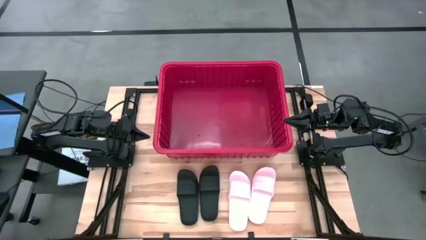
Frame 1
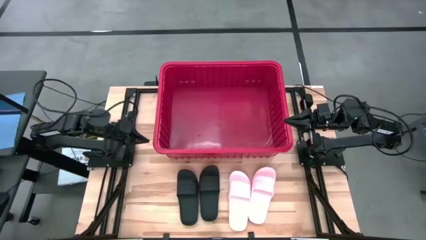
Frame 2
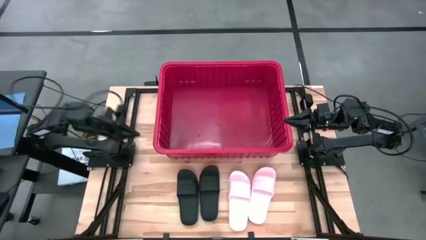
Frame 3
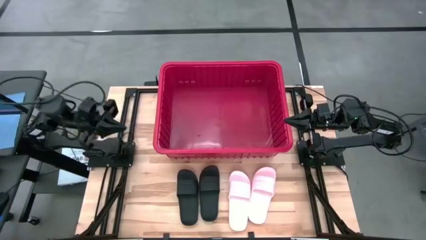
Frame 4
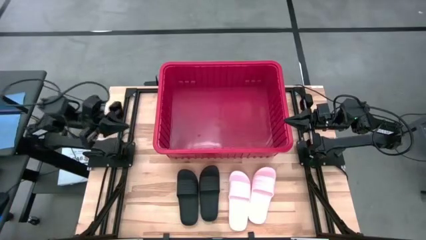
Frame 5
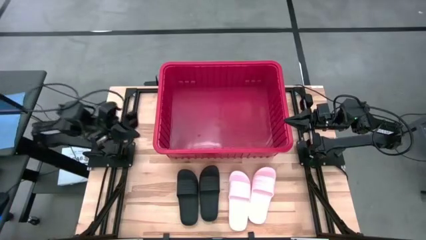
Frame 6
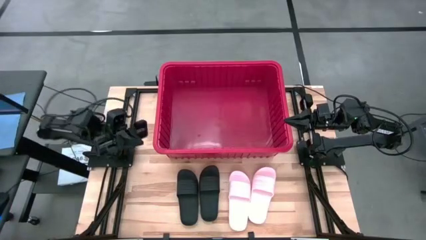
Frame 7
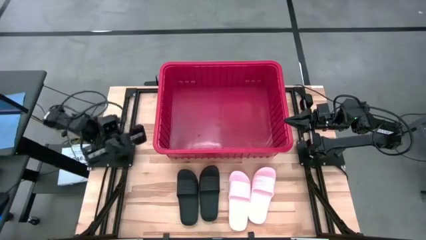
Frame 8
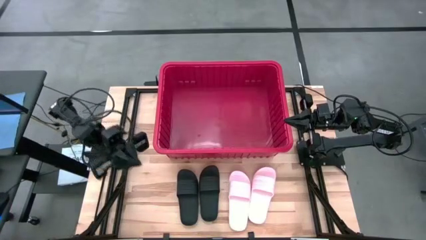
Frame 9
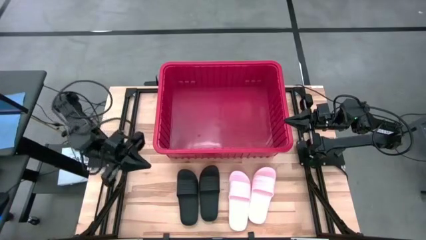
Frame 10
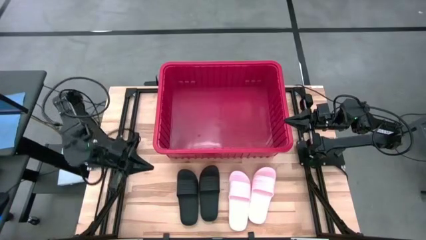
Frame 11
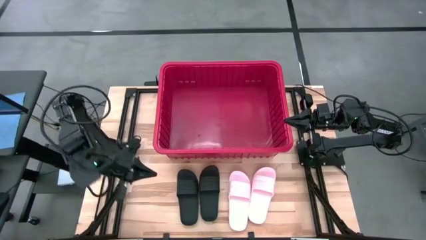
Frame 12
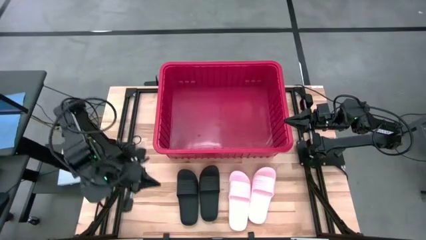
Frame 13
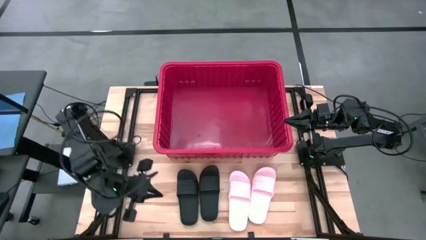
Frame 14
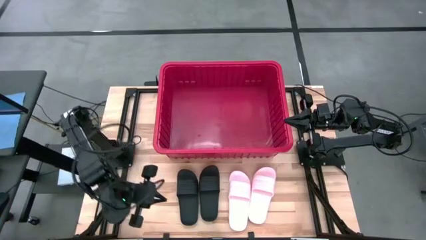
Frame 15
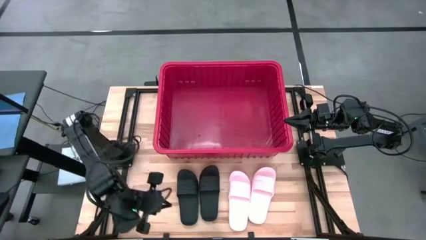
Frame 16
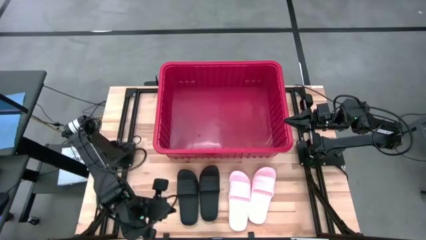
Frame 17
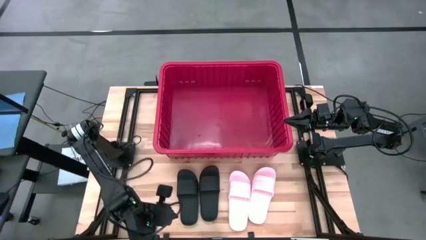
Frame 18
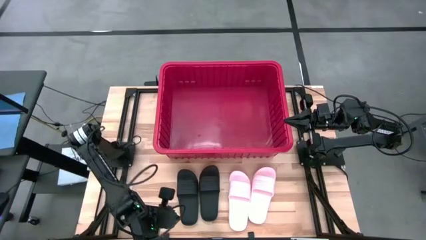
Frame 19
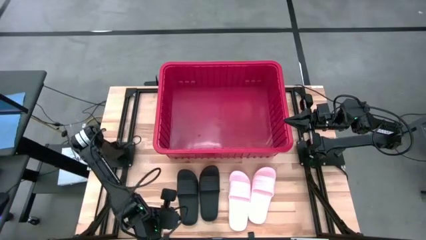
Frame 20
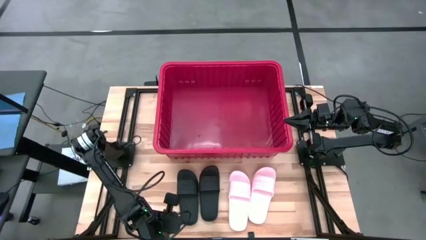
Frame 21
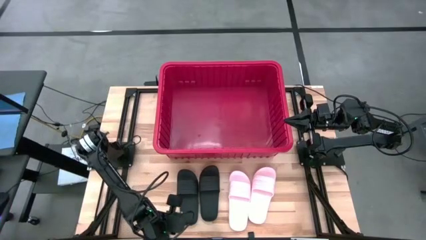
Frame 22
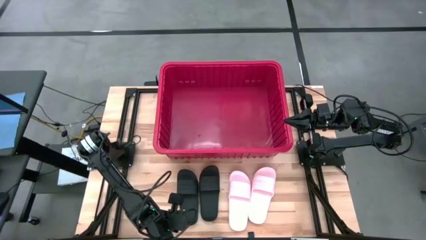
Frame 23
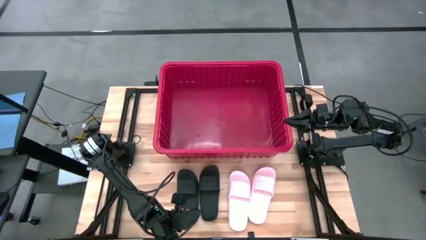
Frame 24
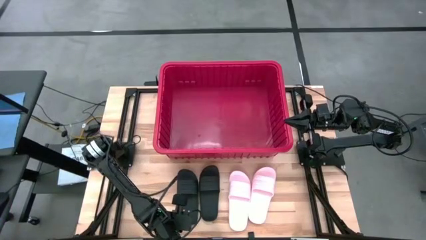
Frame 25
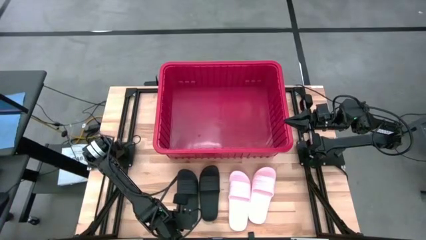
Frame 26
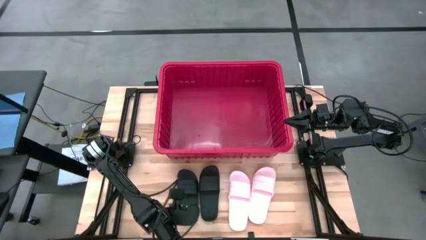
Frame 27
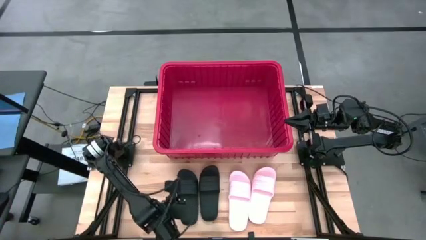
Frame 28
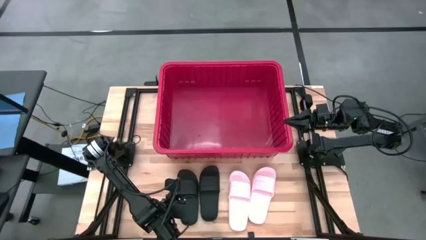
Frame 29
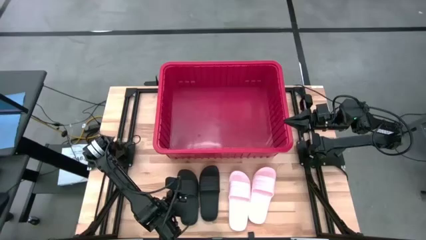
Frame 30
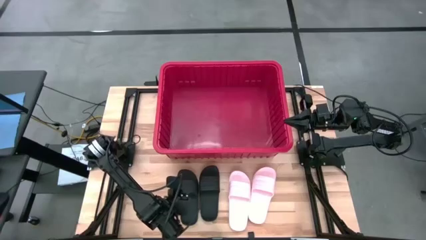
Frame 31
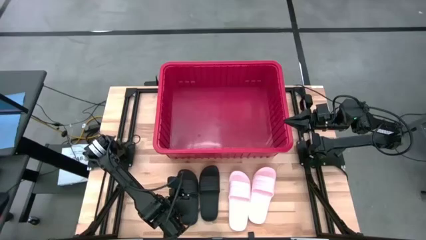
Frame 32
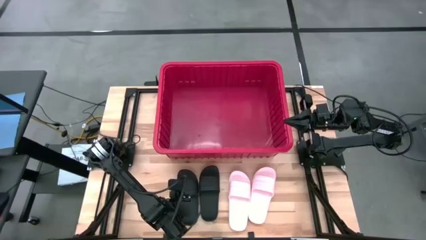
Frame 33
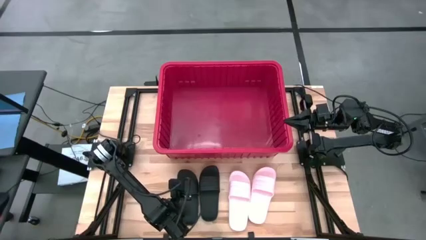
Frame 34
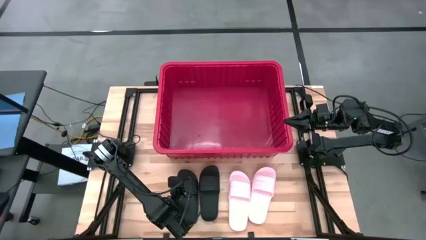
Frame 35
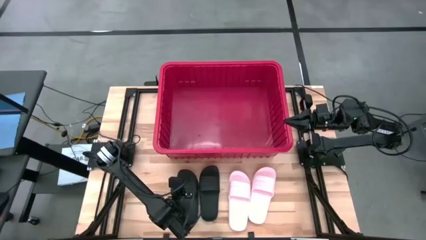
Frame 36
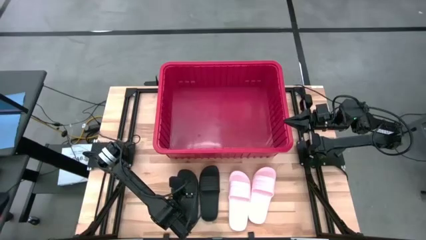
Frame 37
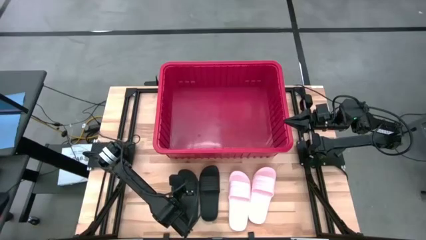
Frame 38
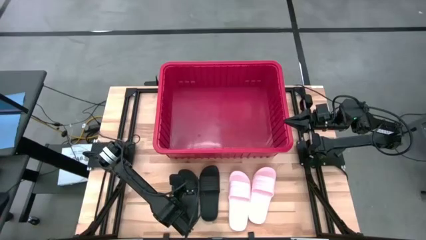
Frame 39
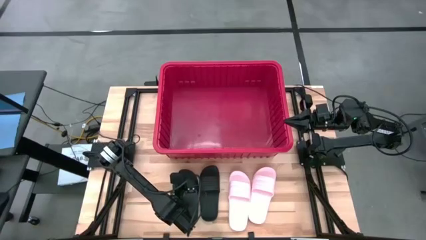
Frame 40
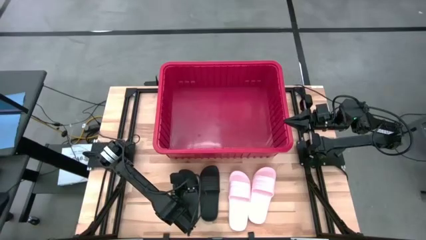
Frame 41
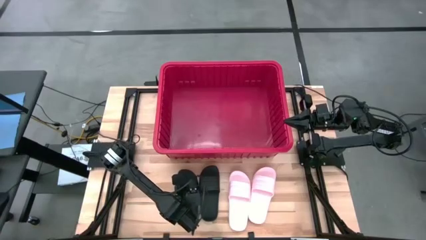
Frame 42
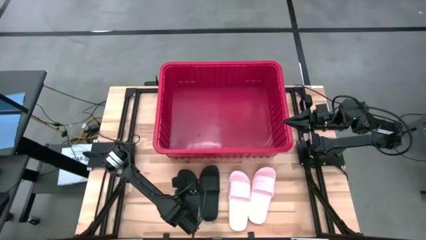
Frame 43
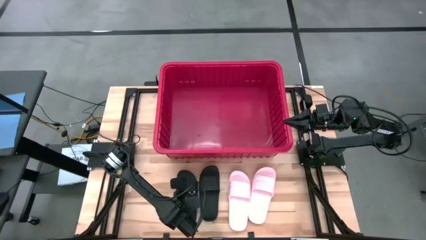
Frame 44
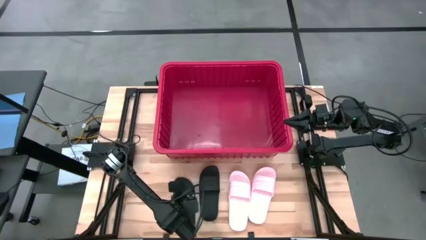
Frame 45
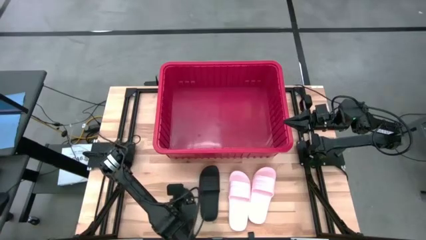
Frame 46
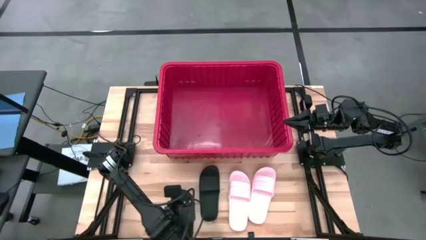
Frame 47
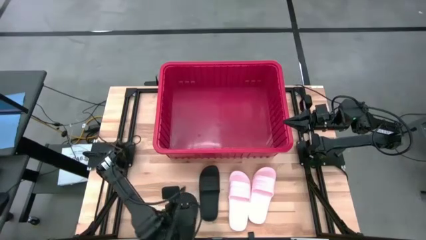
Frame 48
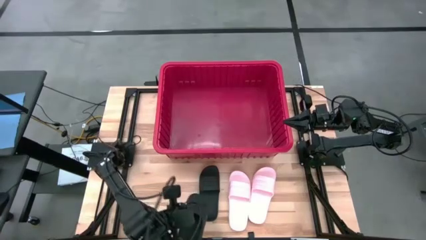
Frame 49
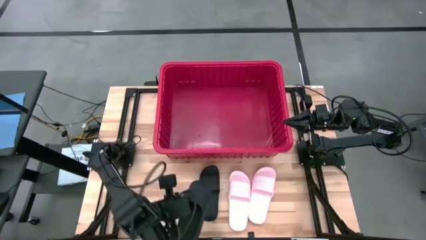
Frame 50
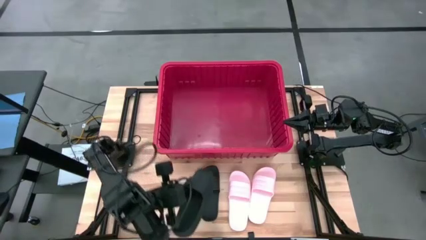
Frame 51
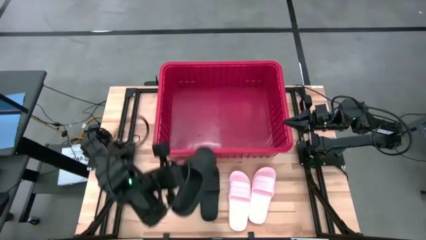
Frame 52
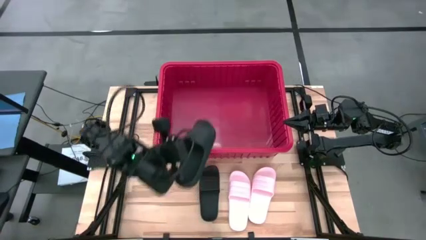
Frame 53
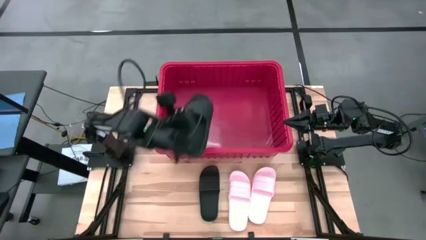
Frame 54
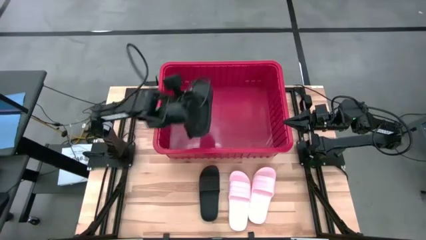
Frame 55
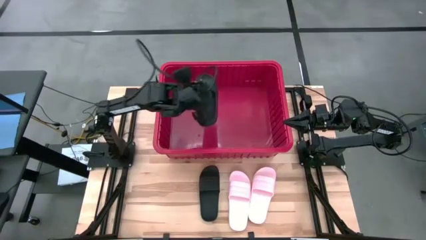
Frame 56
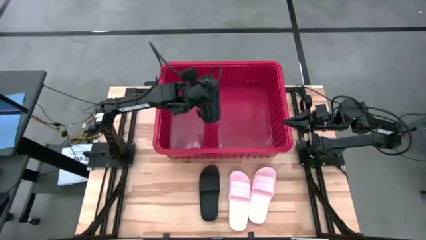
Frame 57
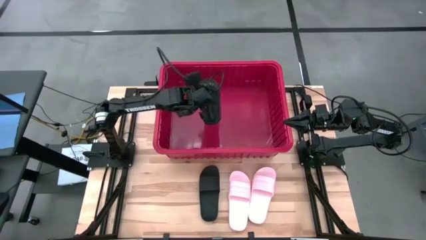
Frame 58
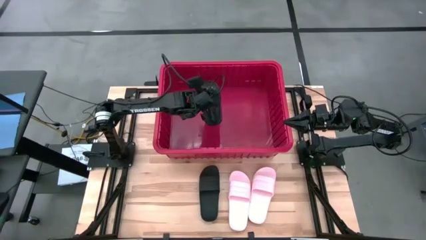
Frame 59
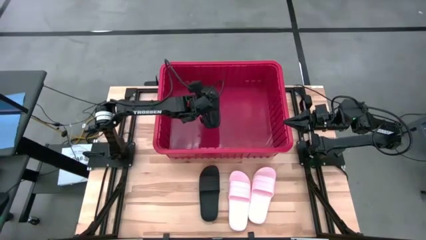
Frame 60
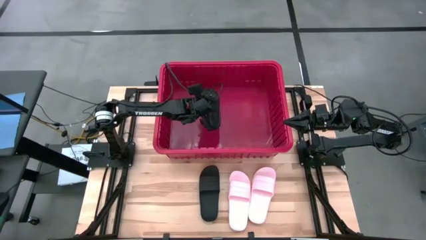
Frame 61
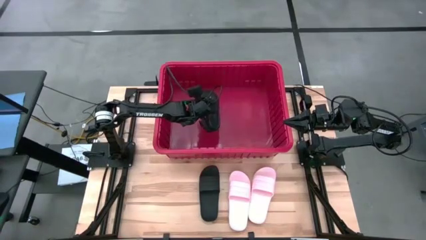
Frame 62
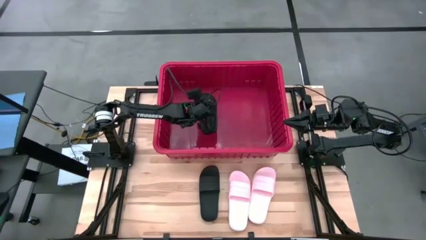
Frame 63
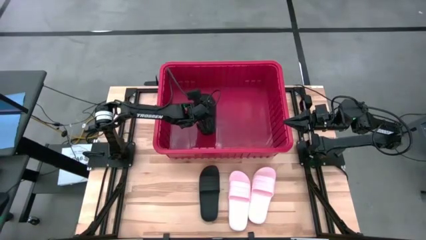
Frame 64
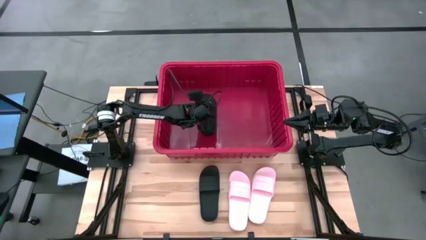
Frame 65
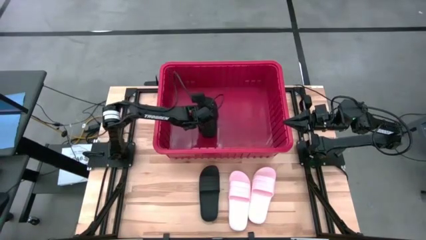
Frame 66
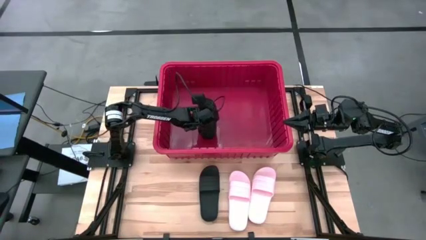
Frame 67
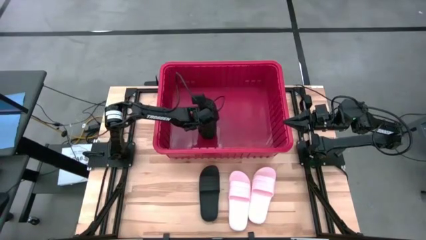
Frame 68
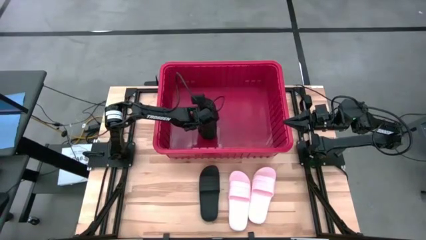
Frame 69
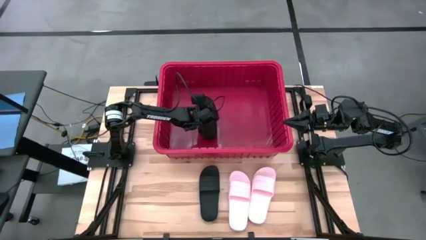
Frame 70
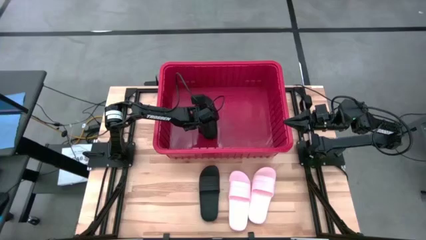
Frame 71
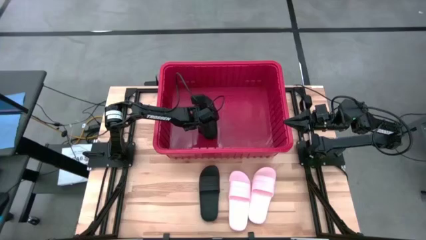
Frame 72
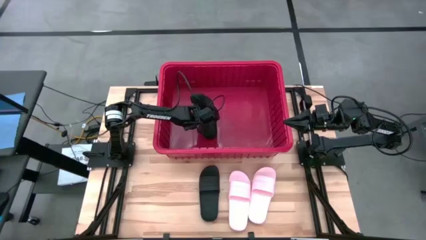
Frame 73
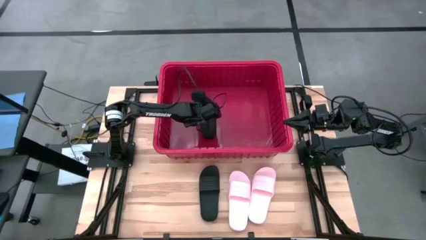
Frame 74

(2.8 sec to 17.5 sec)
Task: Pick and place slides into bin
Put the left black slipper into the red bin
